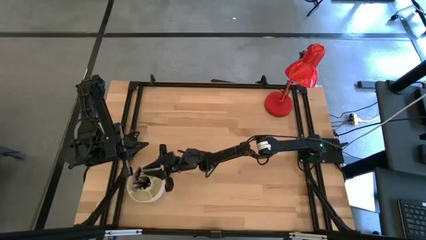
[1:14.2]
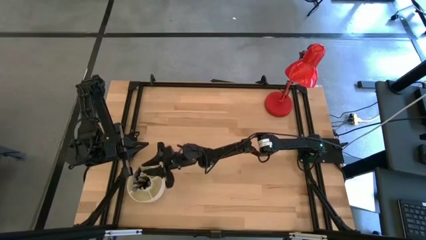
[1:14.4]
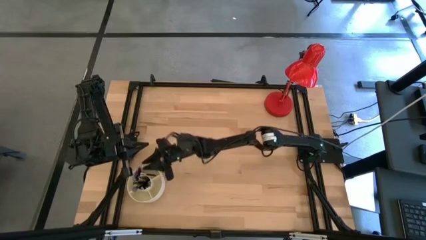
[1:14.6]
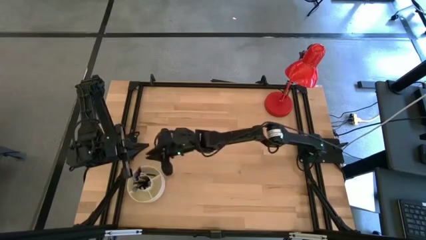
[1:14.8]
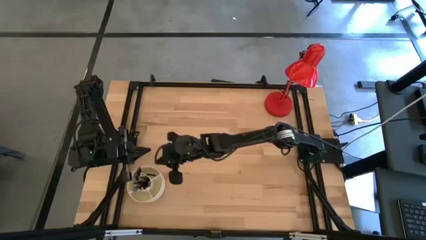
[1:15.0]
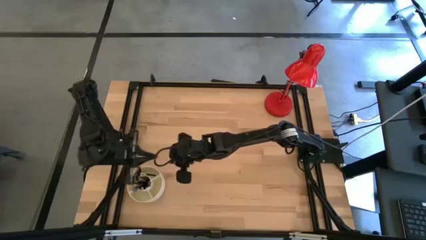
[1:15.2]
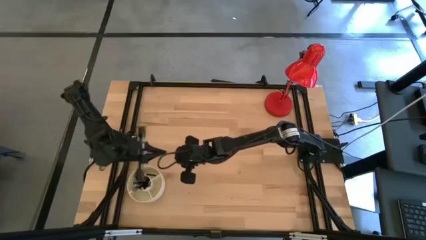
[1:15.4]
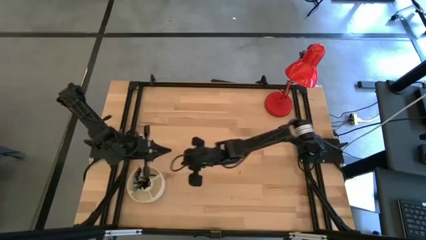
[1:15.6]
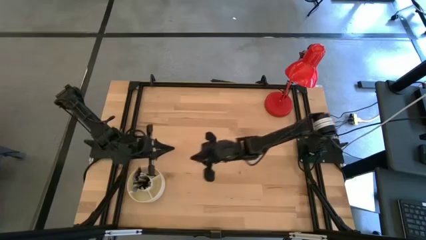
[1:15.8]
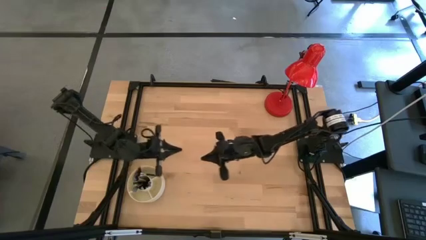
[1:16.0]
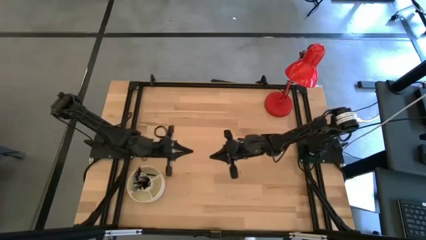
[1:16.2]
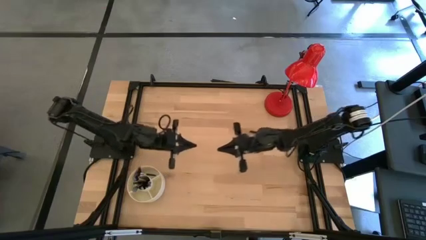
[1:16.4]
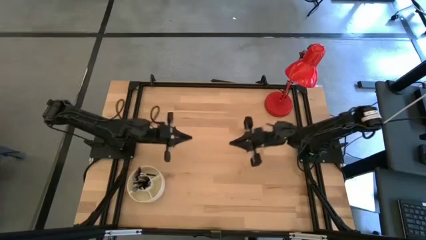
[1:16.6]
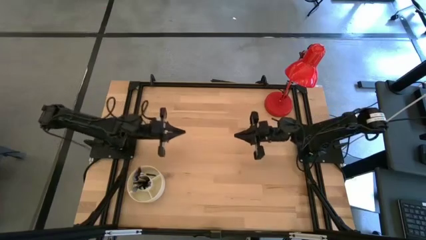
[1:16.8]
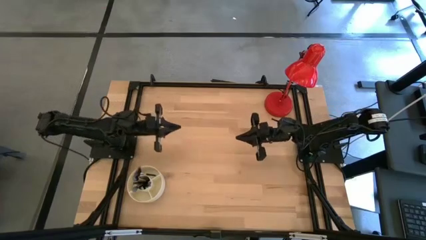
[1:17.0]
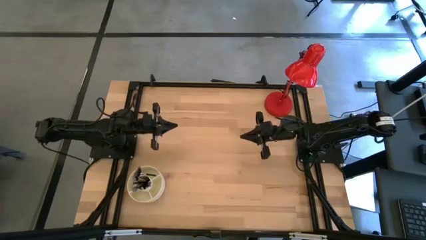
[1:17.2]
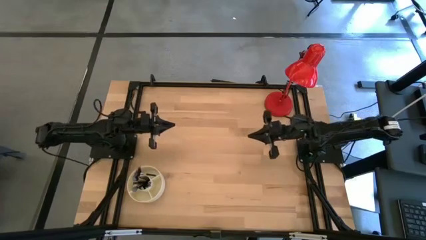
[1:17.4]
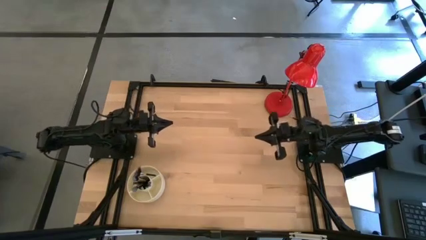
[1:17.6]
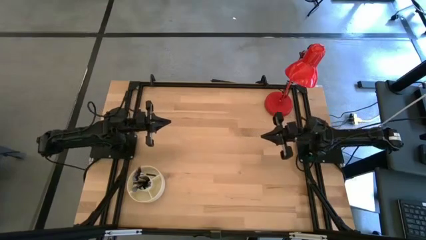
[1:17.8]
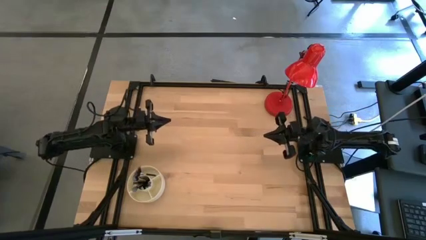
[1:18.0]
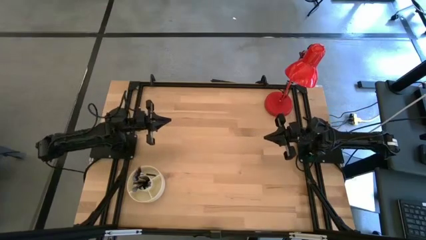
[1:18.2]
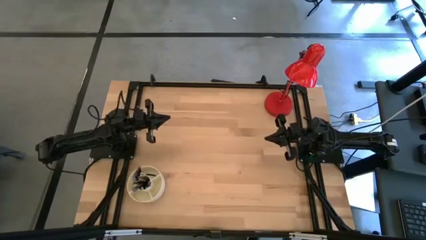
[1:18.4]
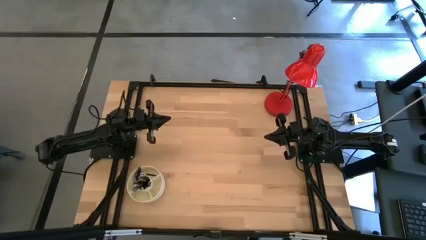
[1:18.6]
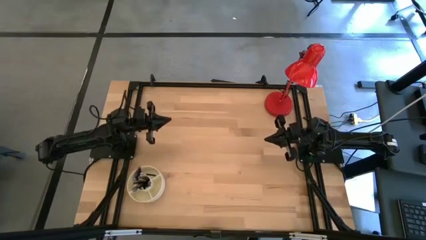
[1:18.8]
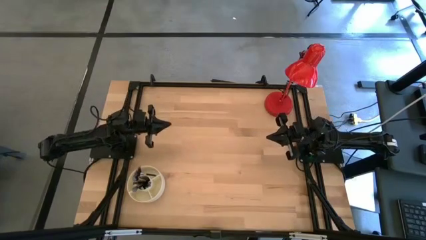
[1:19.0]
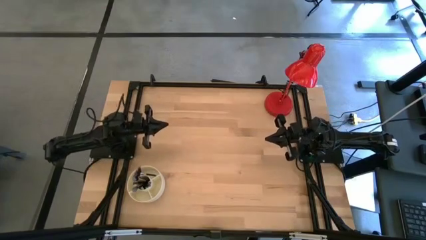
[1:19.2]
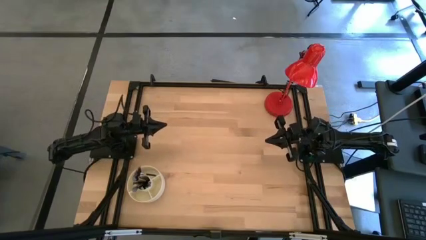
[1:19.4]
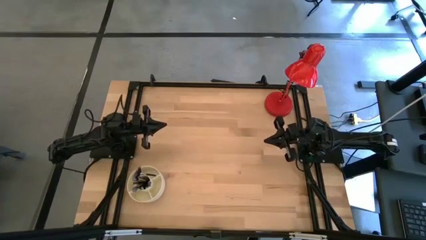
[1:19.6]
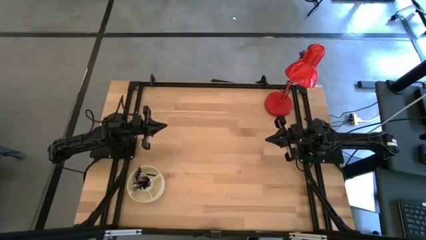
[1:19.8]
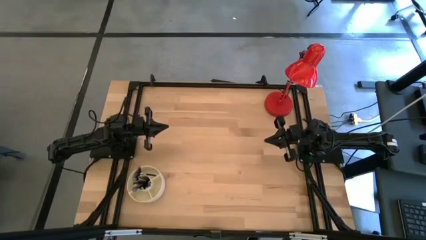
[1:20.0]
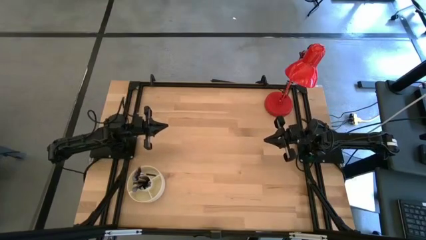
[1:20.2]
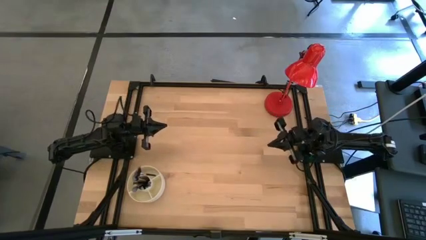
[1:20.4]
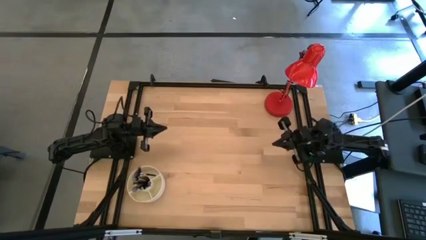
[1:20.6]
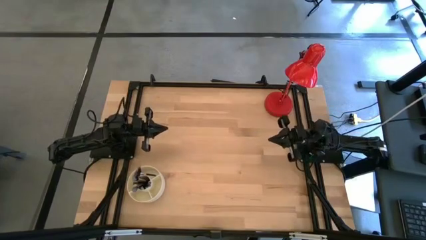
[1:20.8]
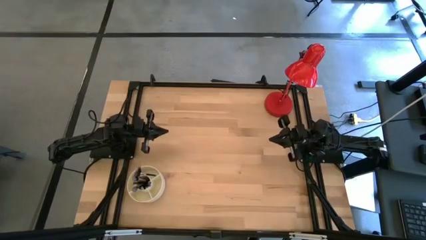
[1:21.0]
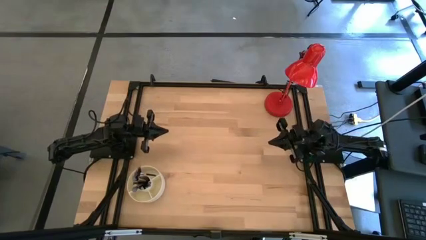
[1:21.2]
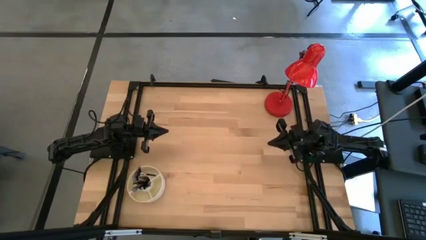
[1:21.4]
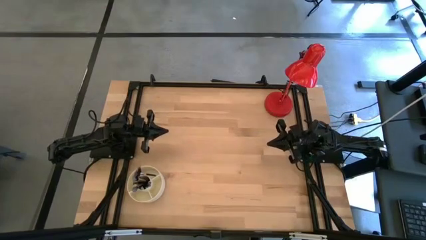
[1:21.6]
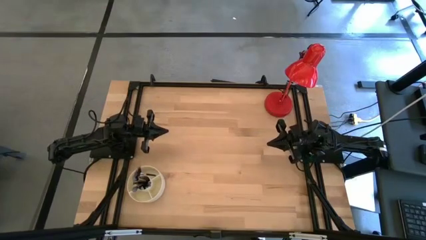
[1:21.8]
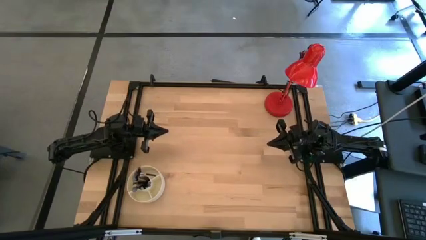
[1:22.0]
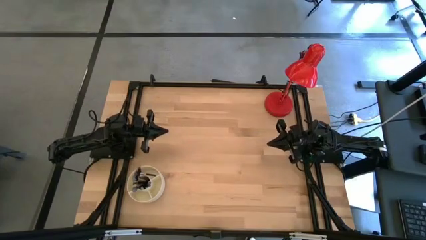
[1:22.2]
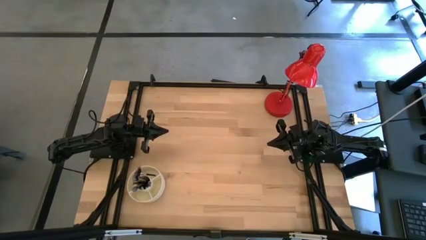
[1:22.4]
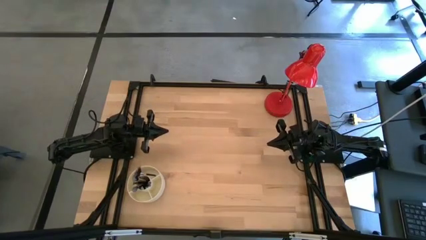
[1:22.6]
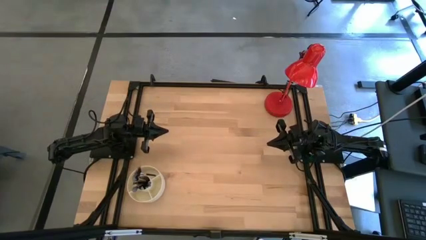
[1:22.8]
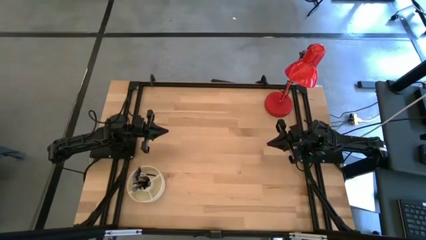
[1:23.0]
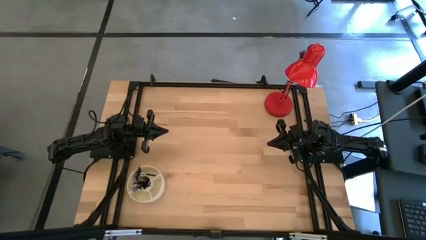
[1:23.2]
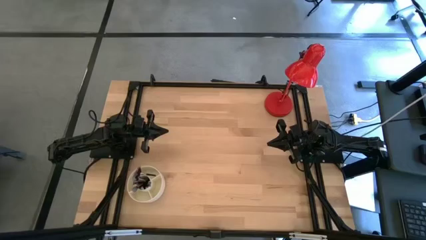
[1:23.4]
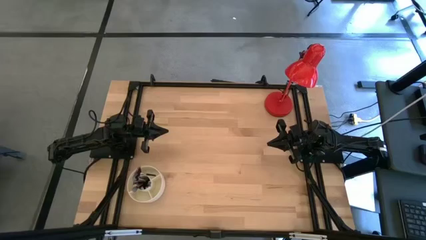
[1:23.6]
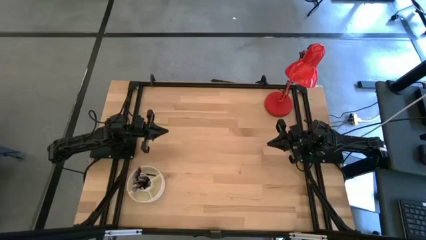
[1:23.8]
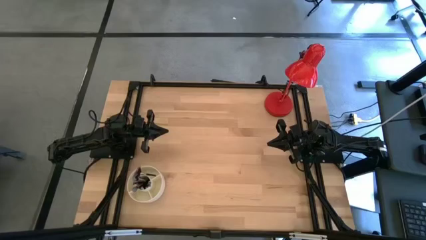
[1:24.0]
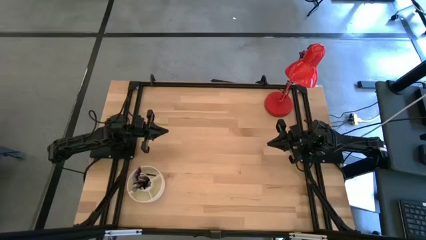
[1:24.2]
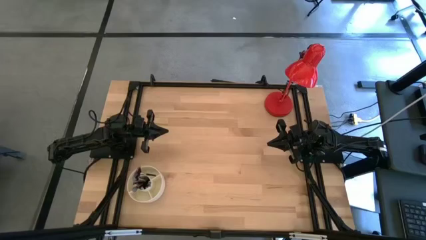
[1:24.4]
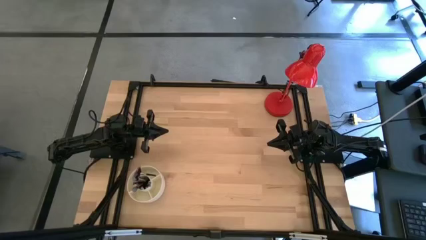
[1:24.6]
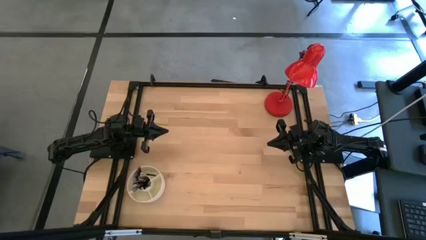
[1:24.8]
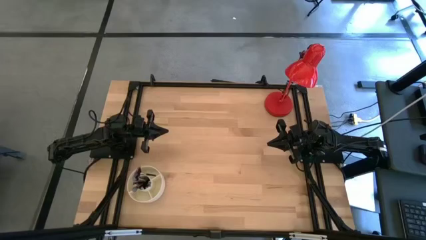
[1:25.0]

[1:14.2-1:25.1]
Task: Put items in baskets/containers
Return to Home Position

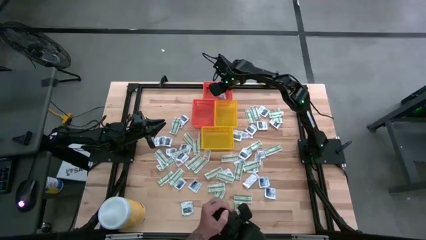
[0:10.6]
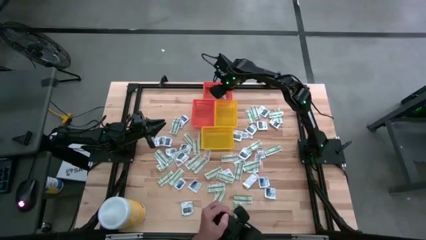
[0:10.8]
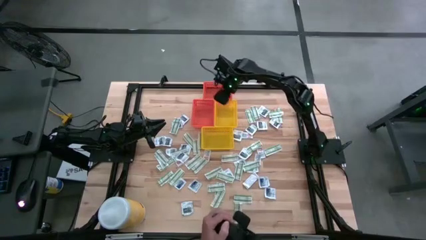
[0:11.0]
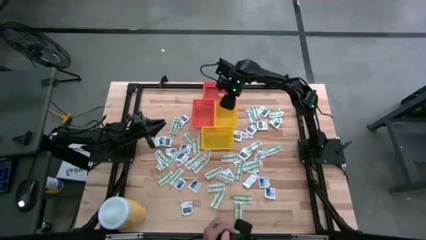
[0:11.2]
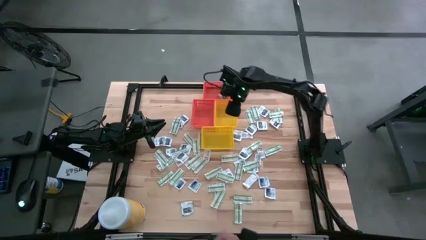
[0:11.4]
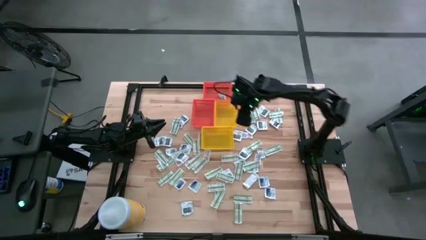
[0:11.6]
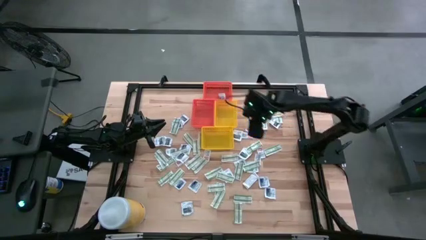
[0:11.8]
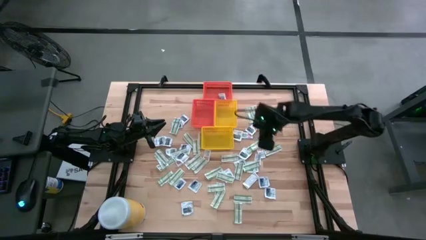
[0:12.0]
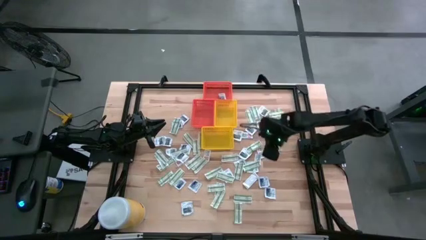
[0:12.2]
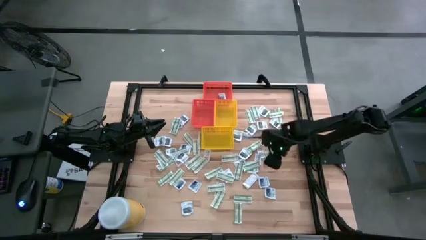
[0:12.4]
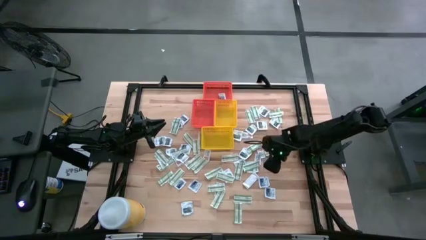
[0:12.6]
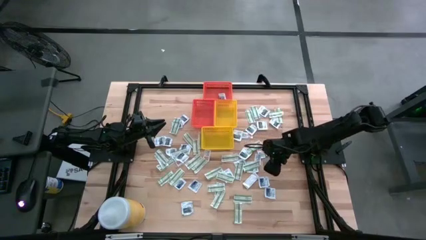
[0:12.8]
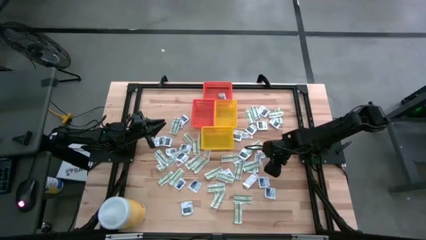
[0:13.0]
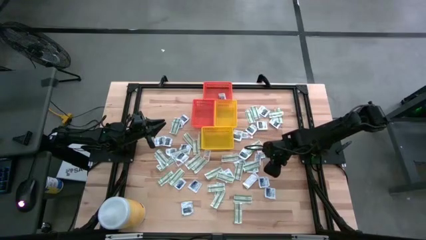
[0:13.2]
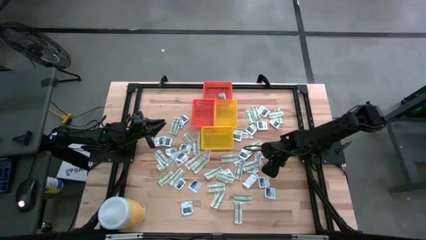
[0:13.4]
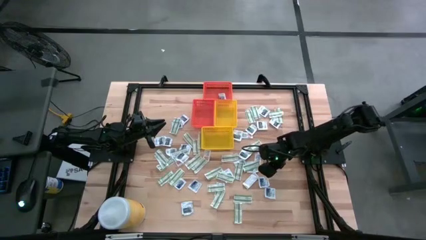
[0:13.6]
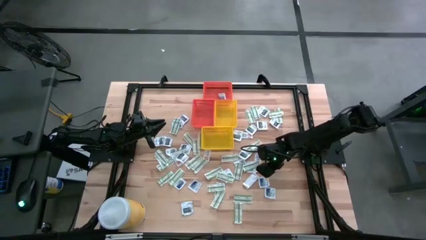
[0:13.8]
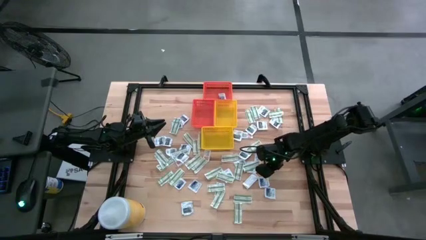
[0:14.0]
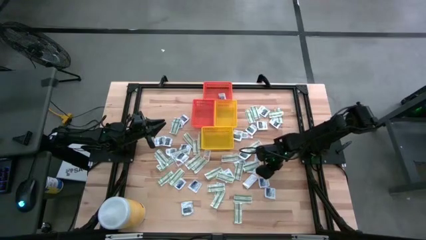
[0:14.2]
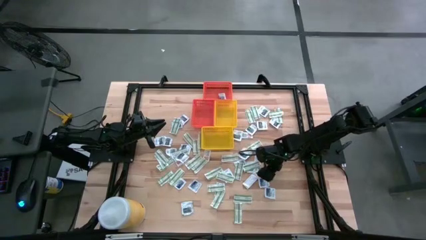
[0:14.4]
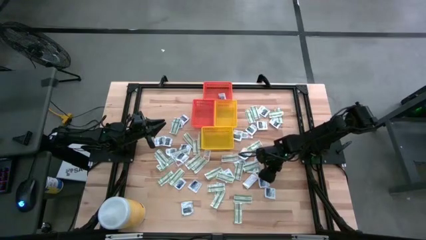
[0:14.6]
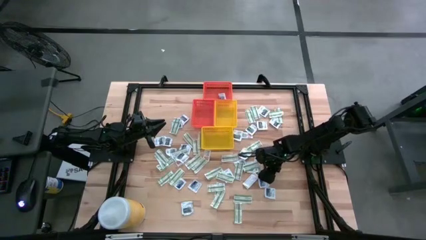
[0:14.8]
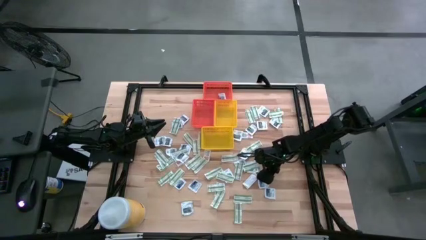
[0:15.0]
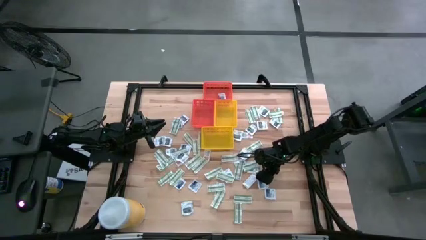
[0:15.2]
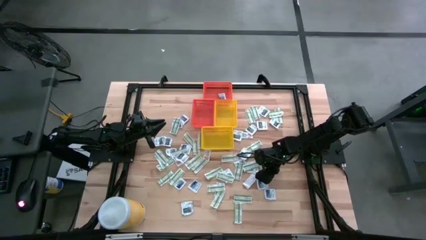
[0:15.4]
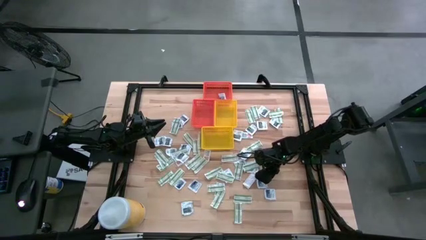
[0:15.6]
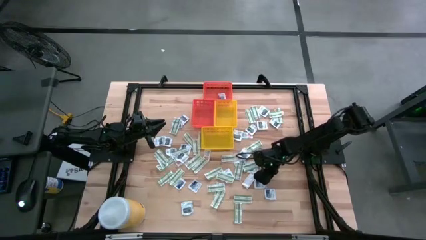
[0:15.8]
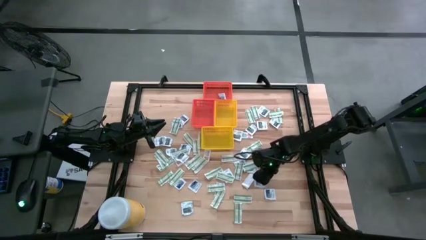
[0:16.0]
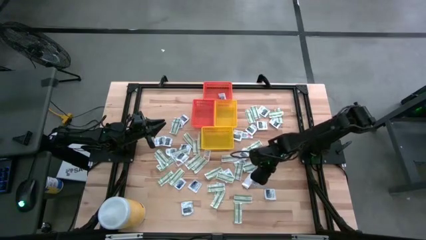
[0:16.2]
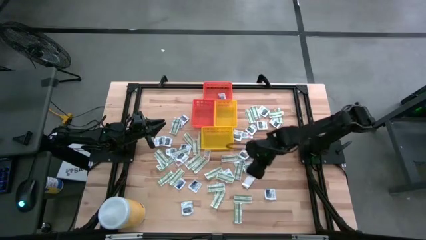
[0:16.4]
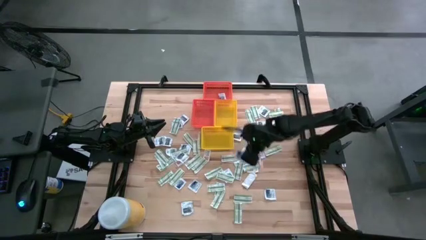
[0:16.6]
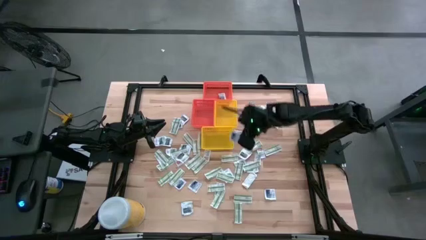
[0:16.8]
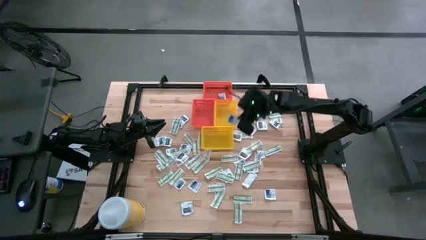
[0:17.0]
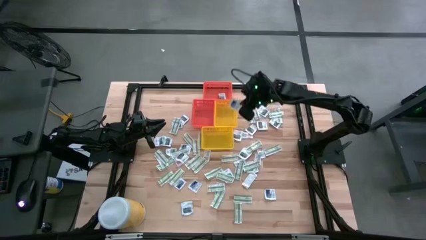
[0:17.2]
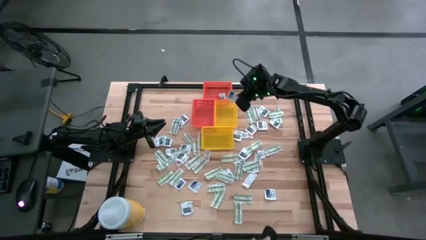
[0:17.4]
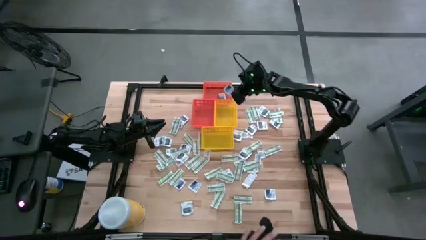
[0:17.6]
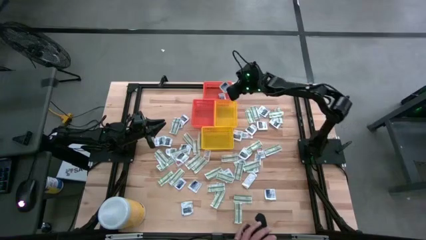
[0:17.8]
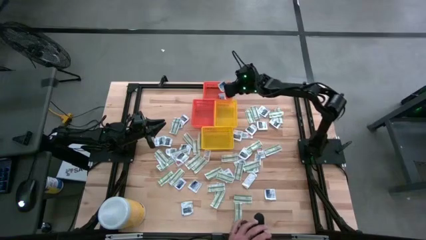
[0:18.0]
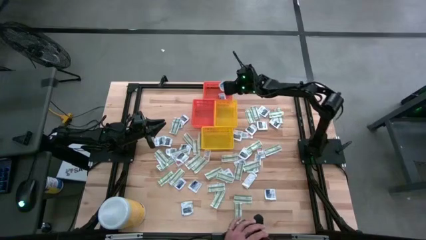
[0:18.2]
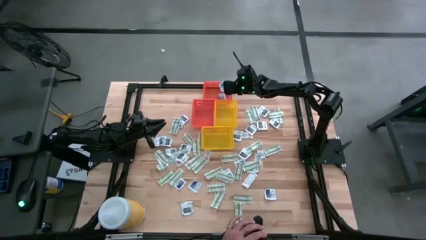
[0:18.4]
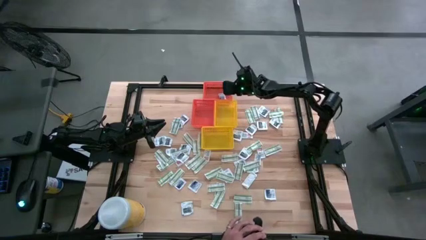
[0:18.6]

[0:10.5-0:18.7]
Task: Pick & Place First Aid Supplies
Put the alcohol pad into the top orange bin
